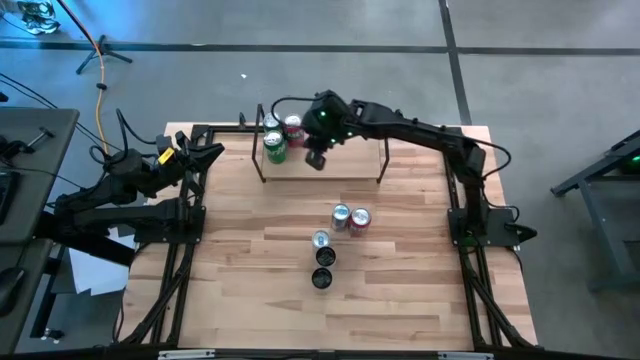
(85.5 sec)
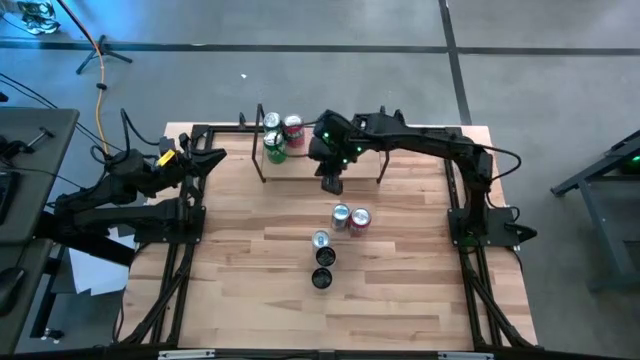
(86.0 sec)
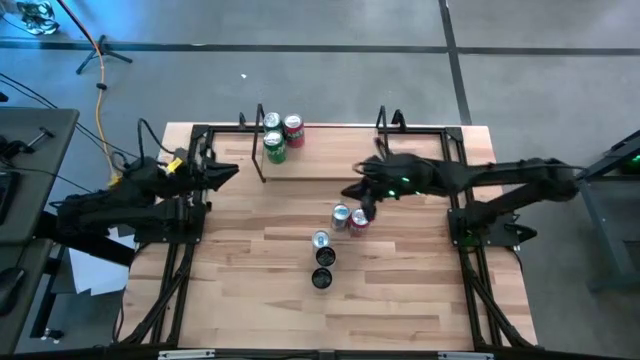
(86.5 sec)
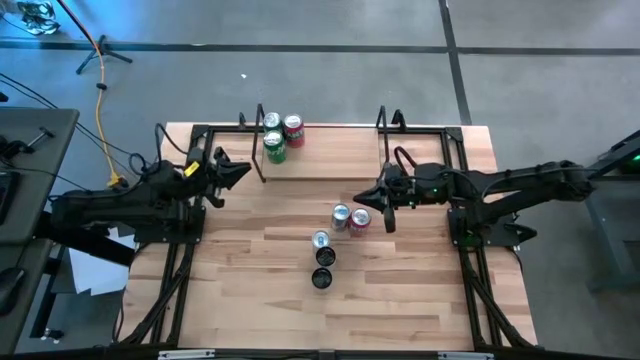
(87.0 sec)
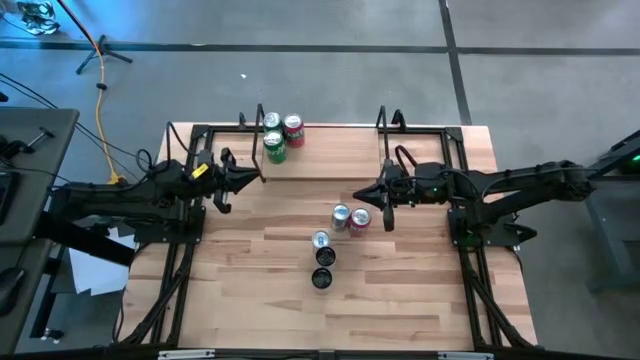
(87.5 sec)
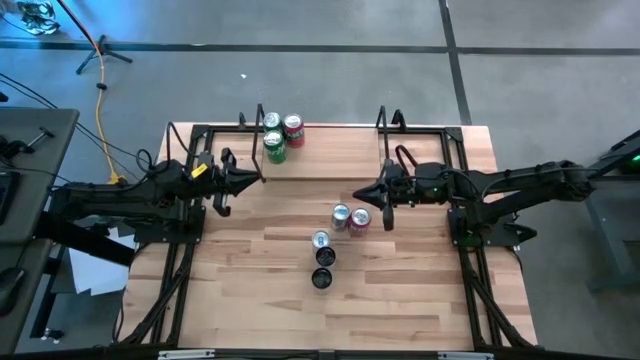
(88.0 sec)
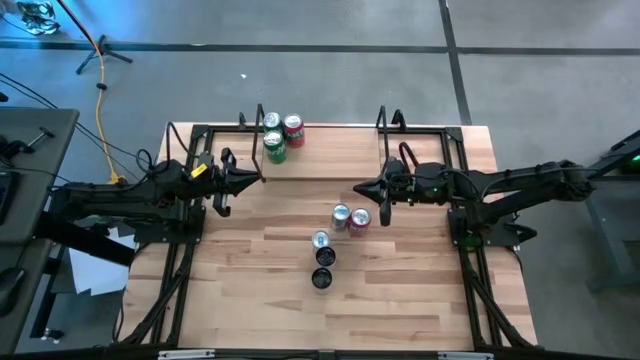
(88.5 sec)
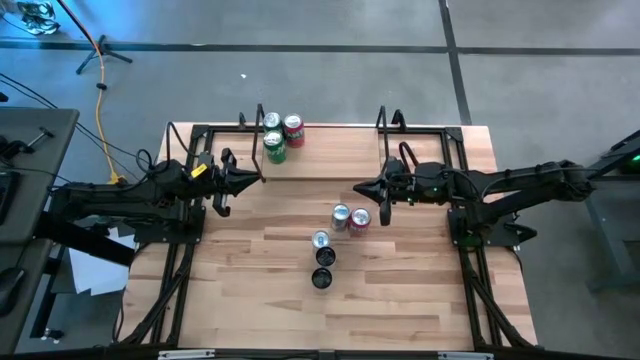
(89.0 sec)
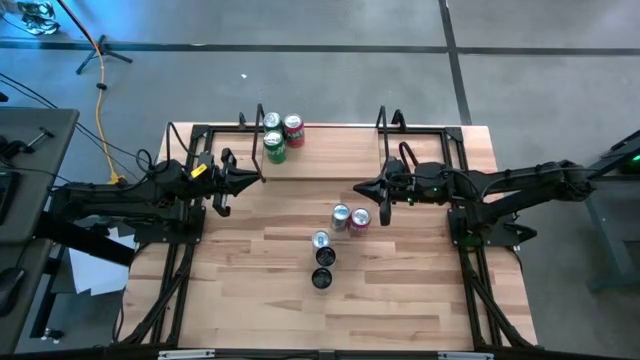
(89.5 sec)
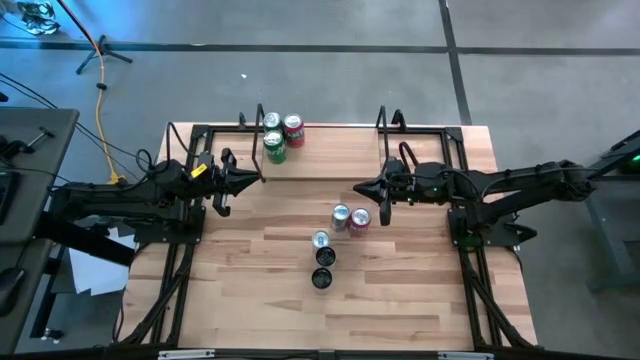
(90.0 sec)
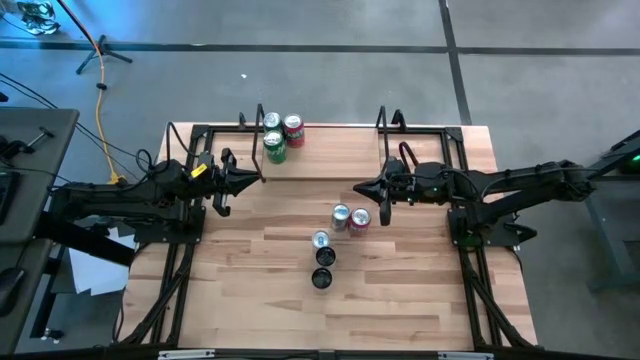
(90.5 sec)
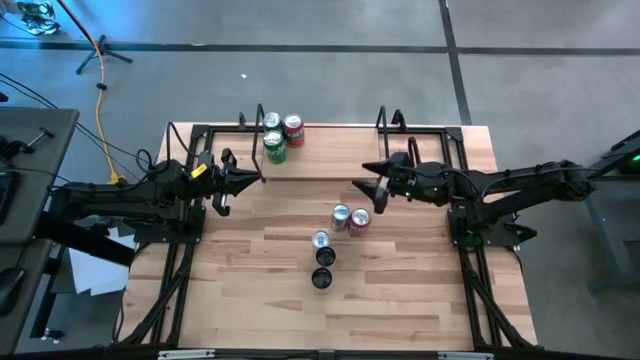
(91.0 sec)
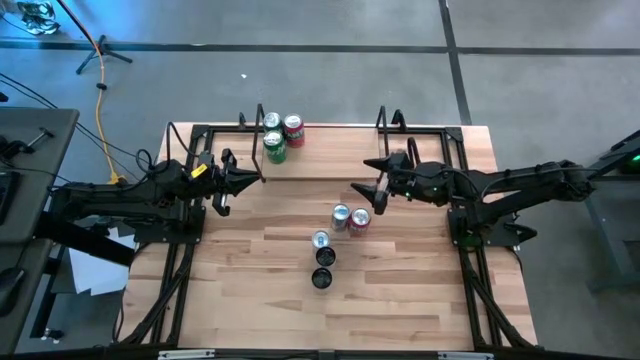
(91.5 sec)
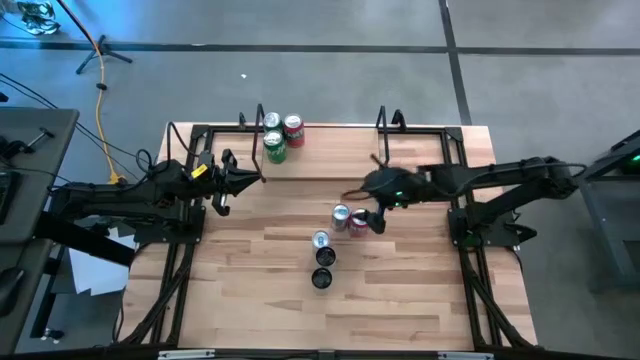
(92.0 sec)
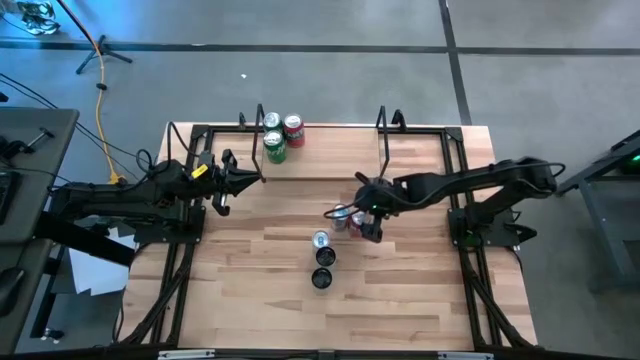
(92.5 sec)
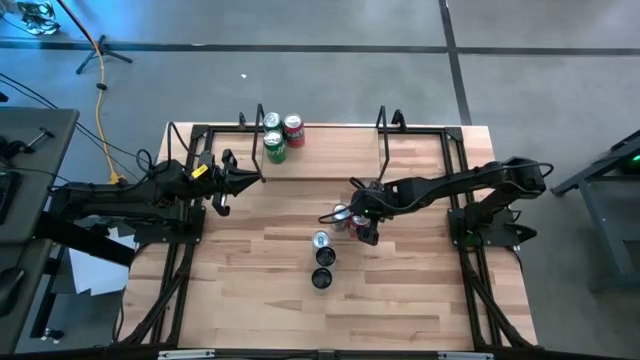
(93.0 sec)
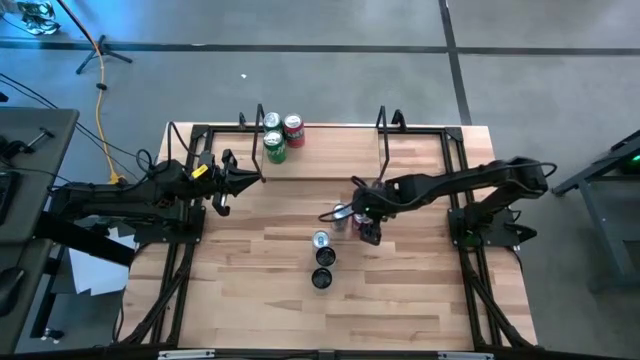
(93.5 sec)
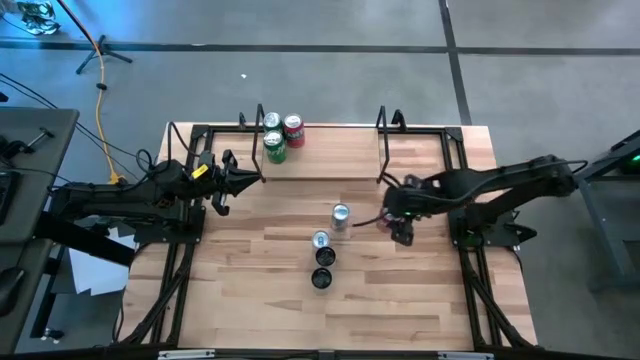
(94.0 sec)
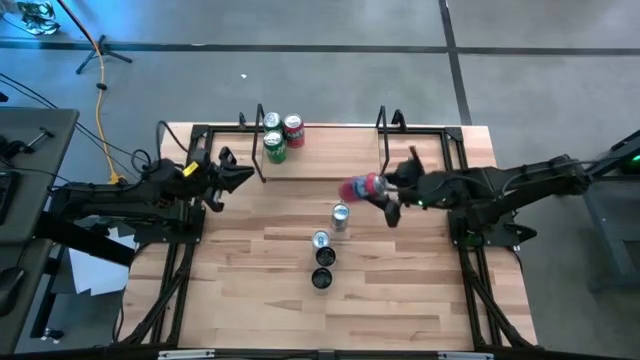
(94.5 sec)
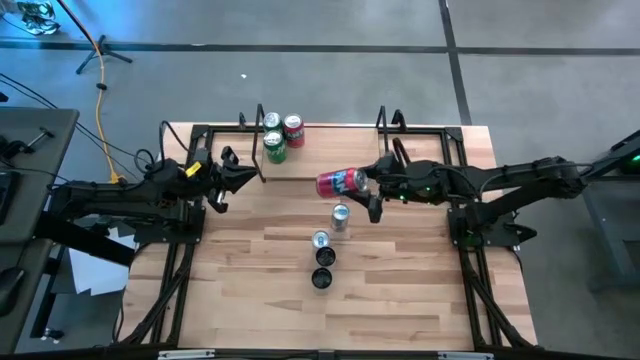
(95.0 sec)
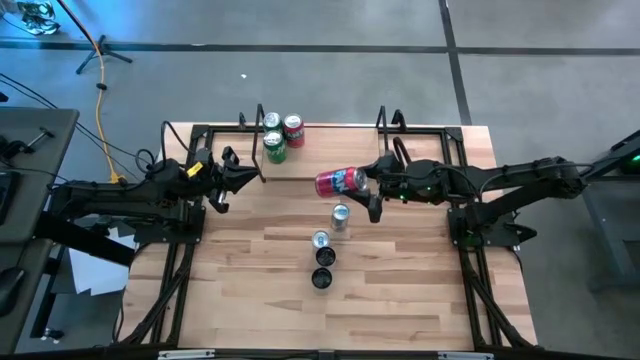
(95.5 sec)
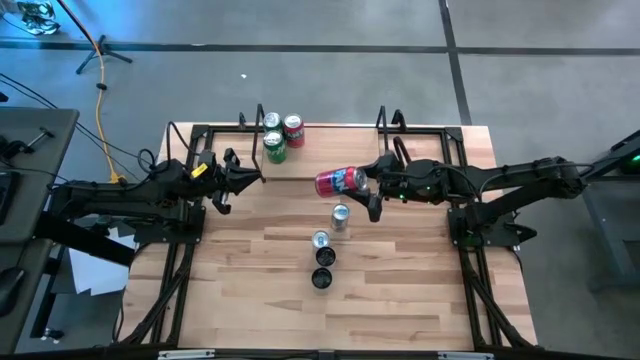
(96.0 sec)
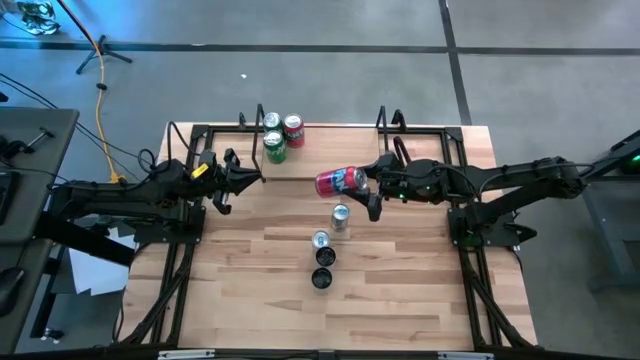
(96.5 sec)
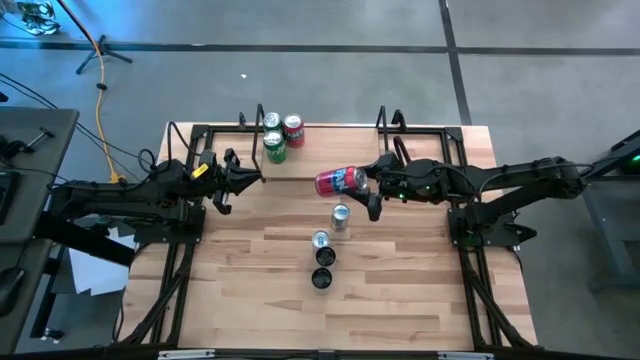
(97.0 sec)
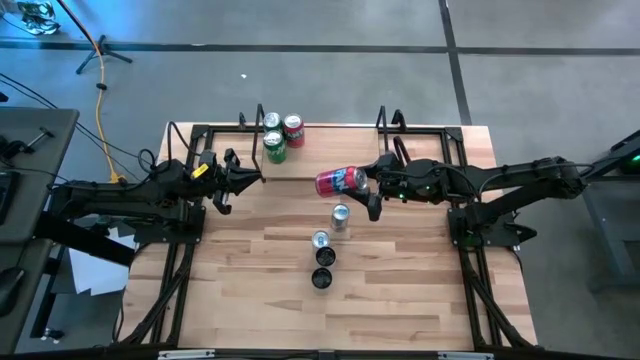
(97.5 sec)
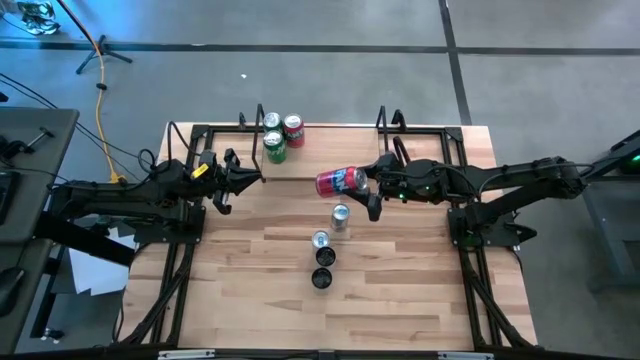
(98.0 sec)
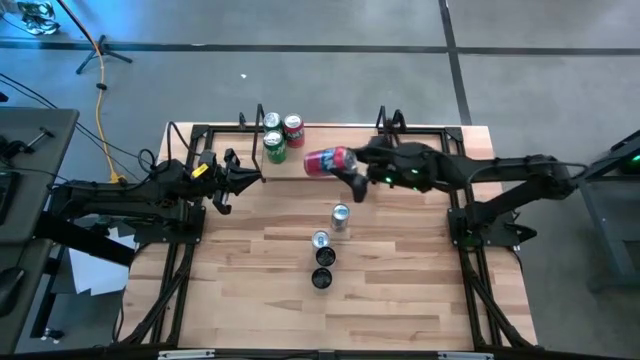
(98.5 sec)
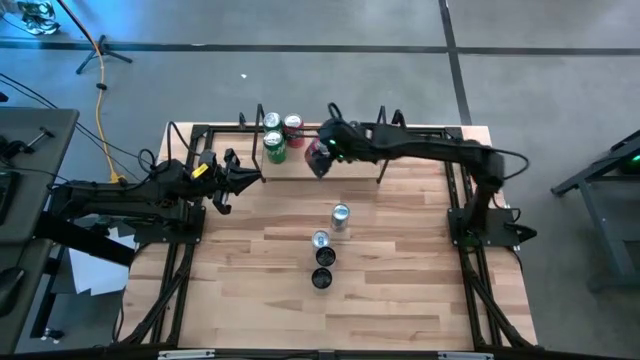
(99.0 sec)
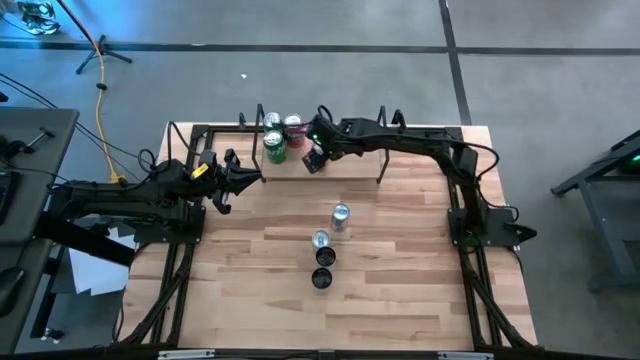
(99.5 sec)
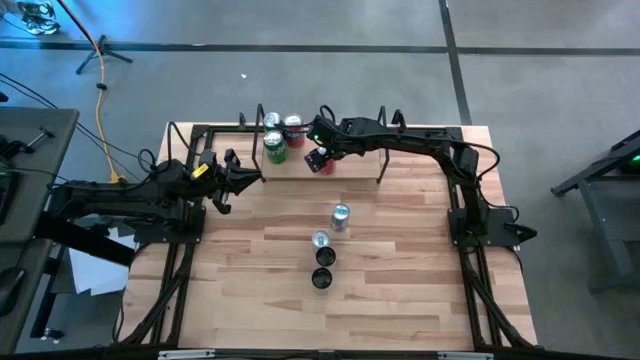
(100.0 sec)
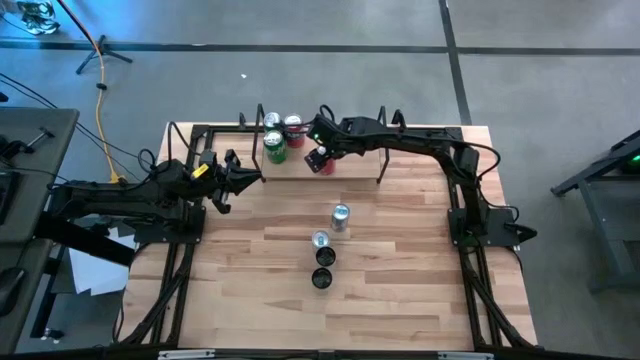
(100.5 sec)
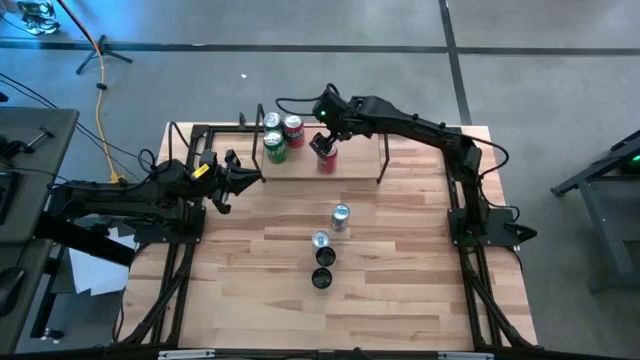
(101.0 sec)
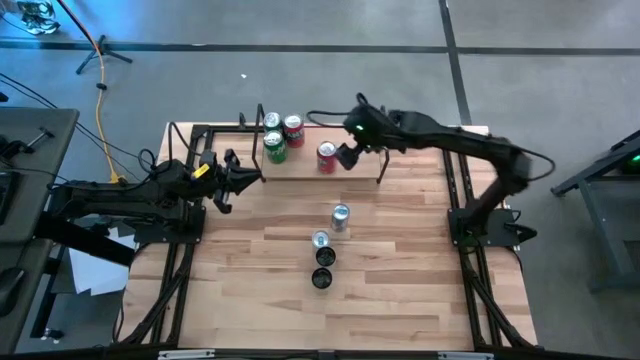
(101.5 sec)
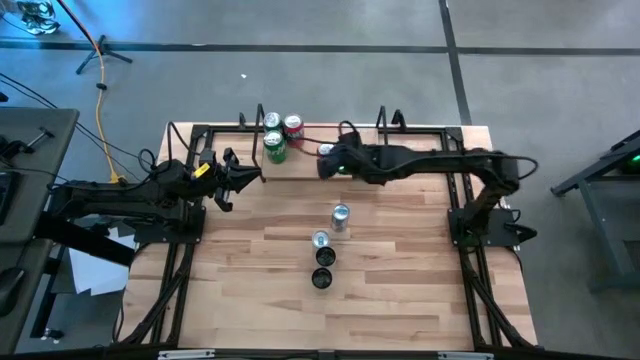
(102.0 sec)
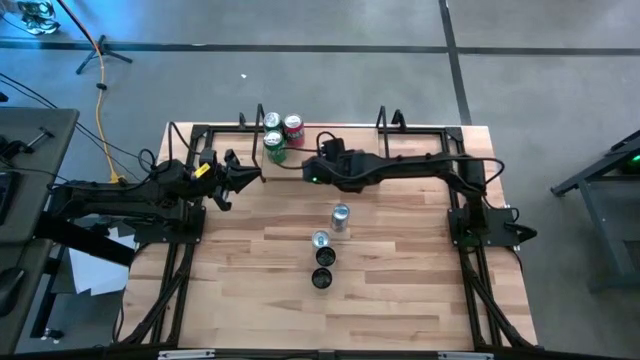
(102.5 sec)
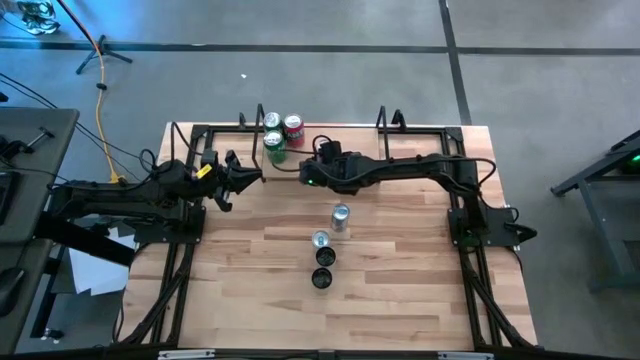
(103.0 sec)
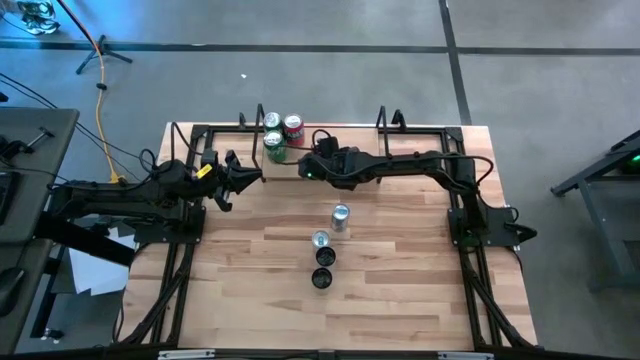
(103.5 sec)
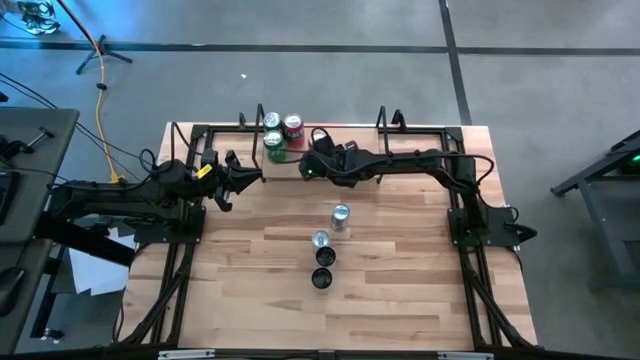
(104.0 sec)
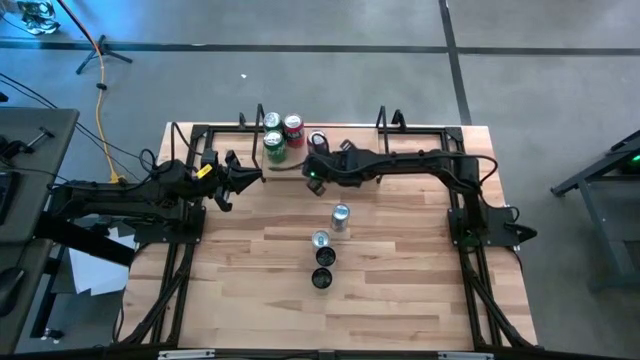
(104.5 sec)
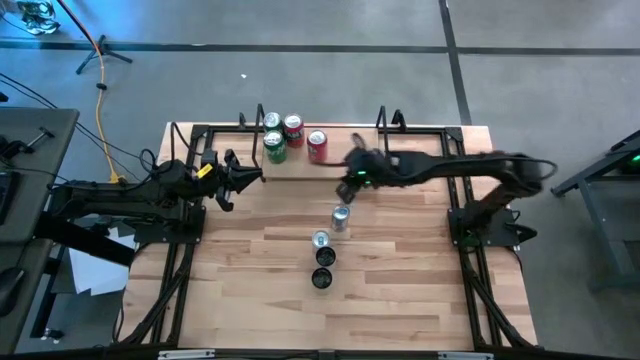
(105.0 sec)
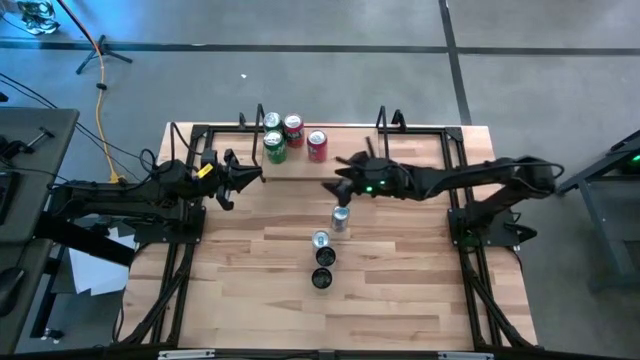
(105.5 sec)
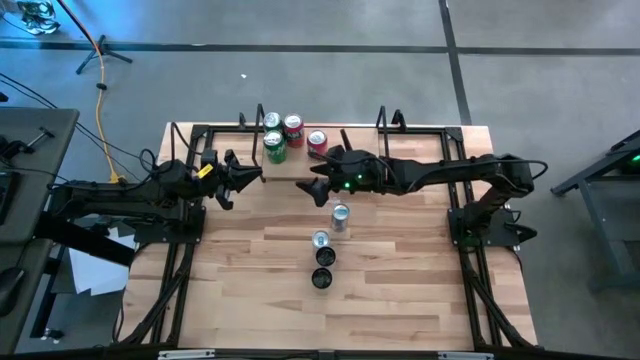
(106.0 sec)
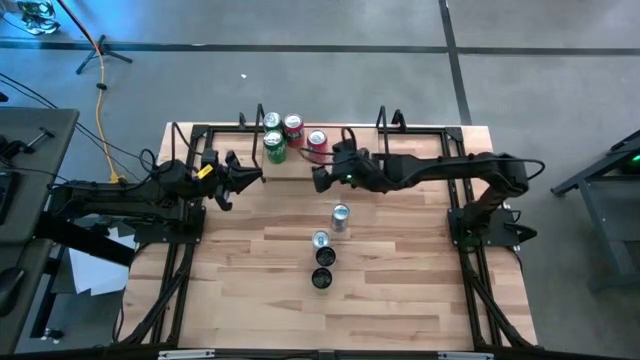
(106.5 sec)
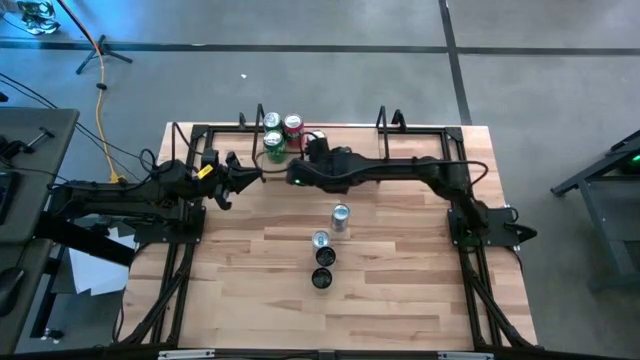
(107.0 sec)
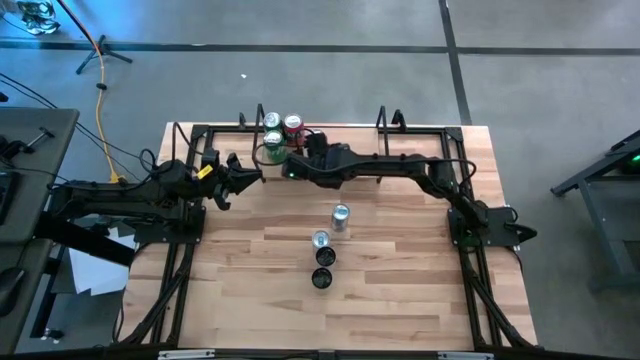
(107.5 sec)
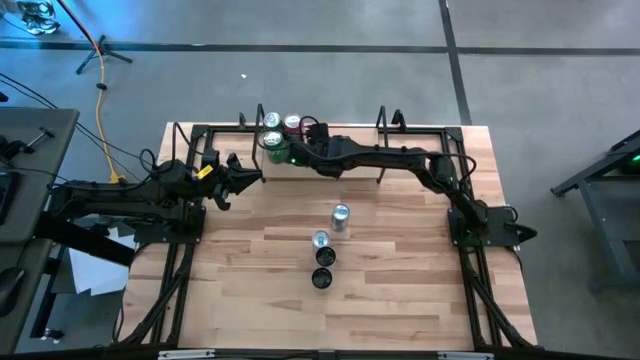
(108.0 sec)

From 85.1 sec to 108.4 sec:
Task: Place canned beverage on shelf
Put the red soda can on the shelf aligned with the red soda can
